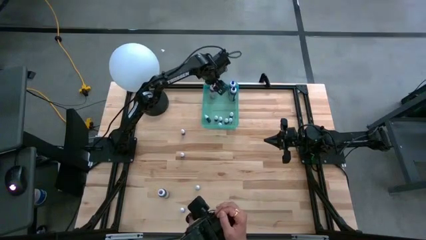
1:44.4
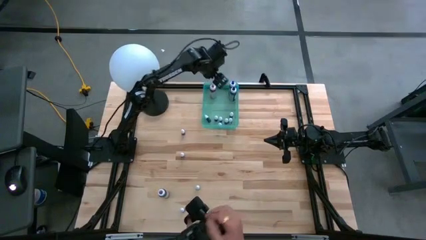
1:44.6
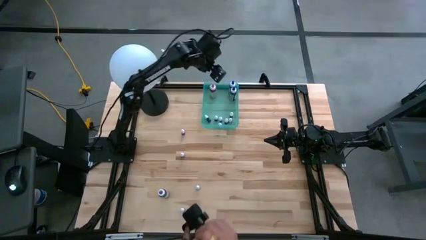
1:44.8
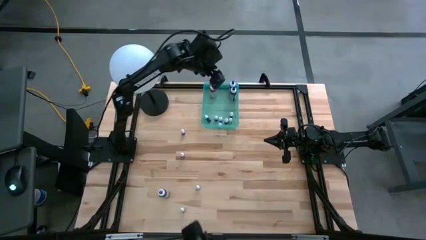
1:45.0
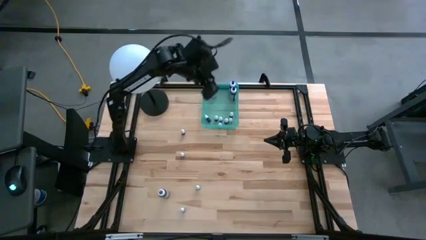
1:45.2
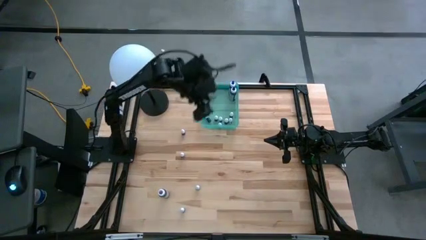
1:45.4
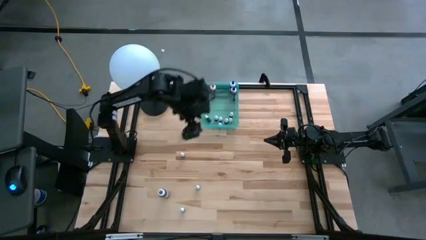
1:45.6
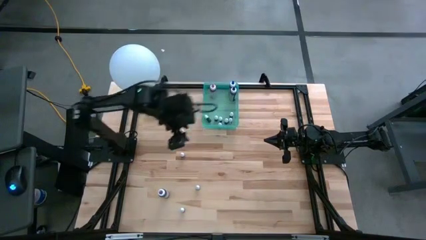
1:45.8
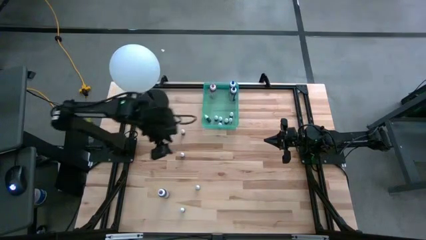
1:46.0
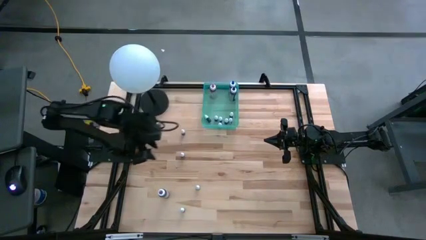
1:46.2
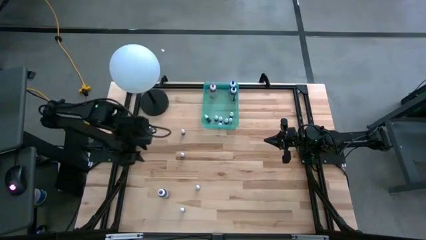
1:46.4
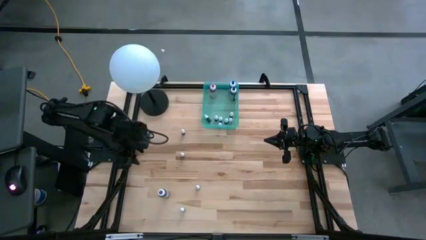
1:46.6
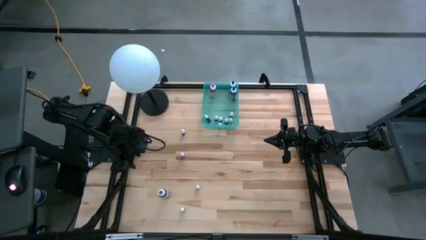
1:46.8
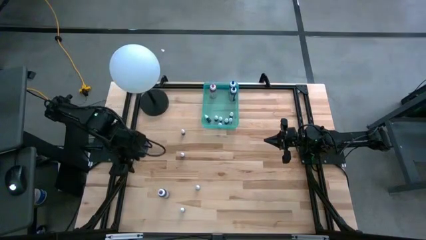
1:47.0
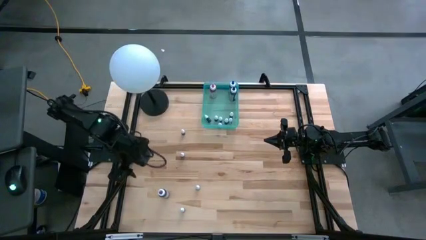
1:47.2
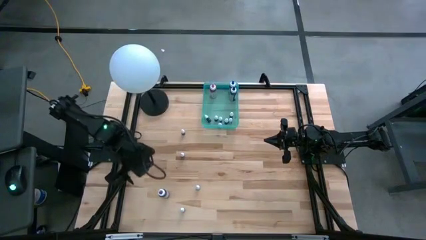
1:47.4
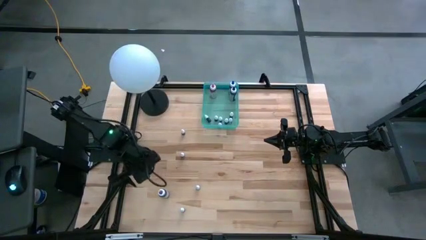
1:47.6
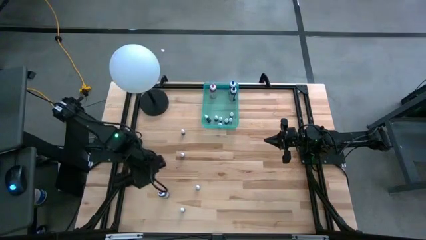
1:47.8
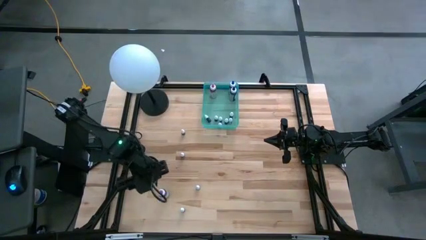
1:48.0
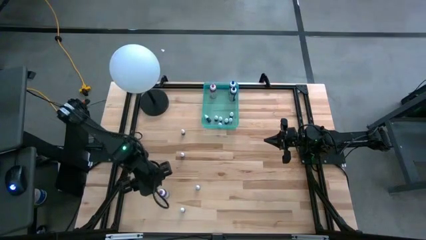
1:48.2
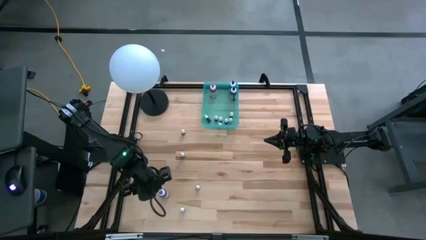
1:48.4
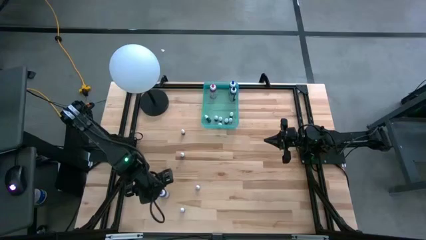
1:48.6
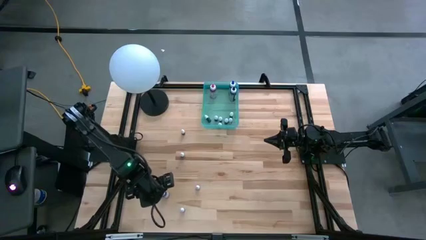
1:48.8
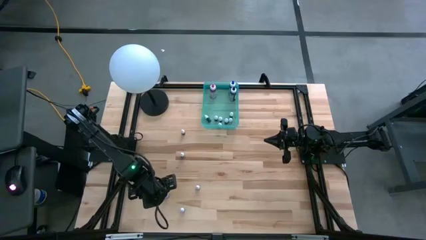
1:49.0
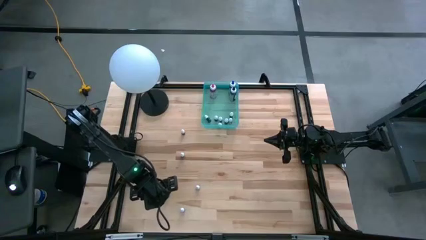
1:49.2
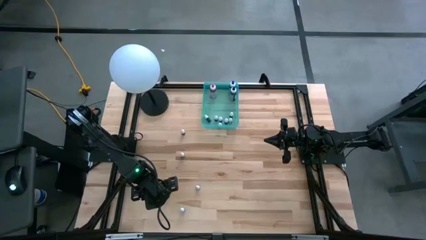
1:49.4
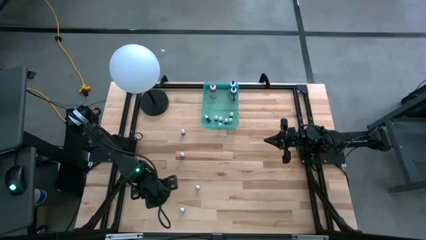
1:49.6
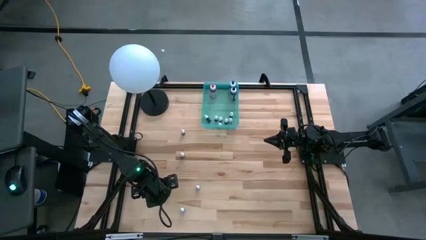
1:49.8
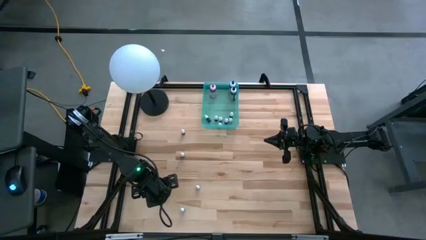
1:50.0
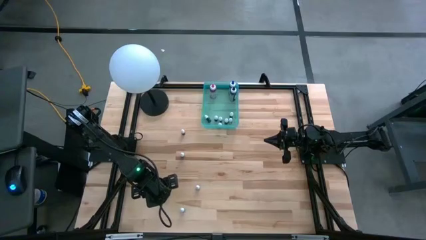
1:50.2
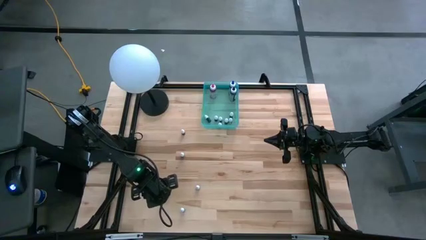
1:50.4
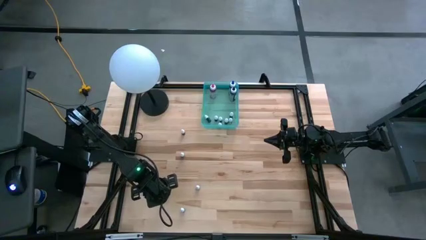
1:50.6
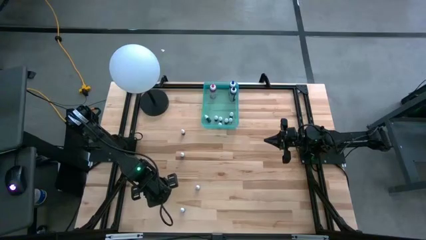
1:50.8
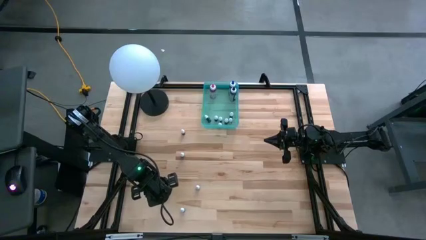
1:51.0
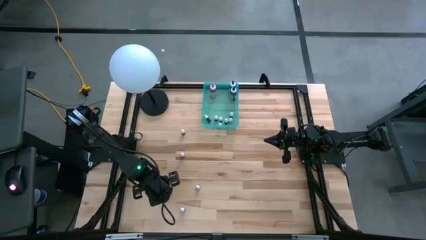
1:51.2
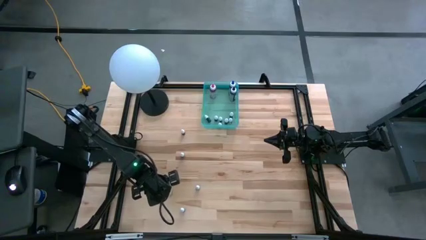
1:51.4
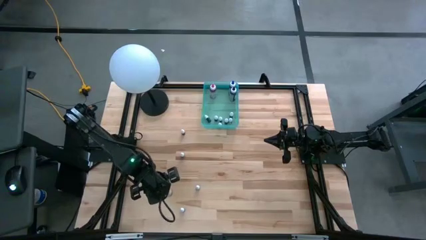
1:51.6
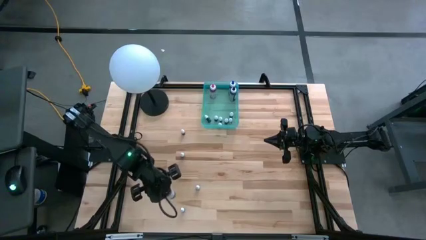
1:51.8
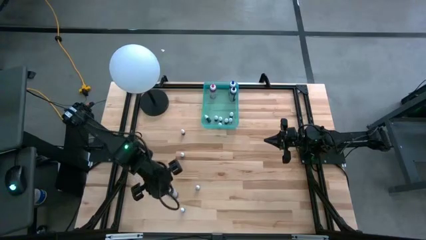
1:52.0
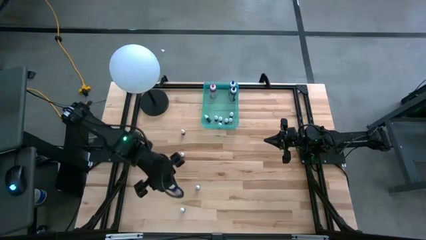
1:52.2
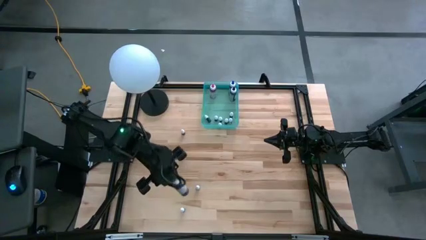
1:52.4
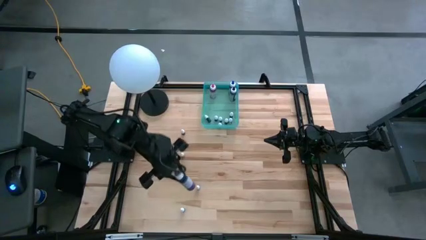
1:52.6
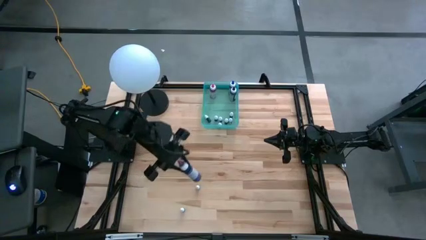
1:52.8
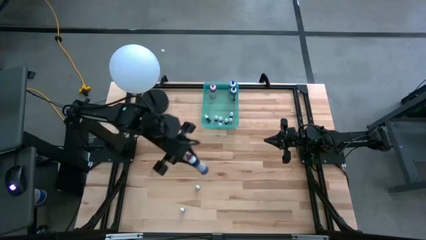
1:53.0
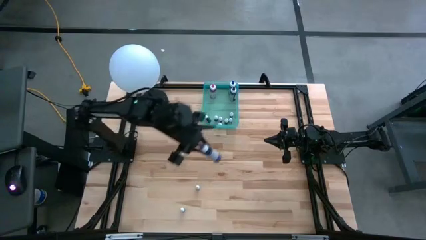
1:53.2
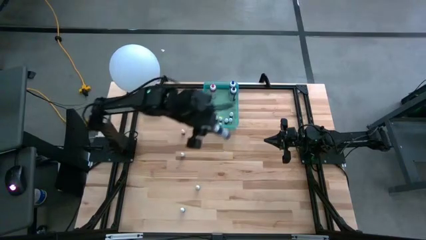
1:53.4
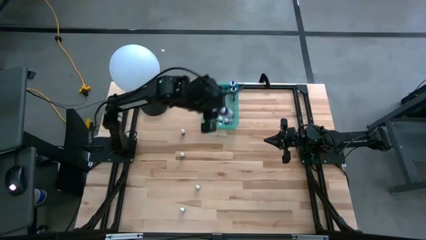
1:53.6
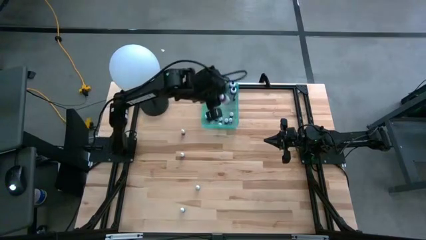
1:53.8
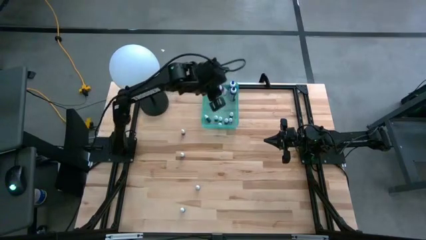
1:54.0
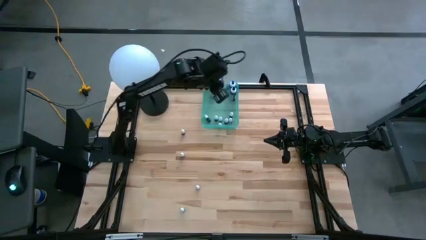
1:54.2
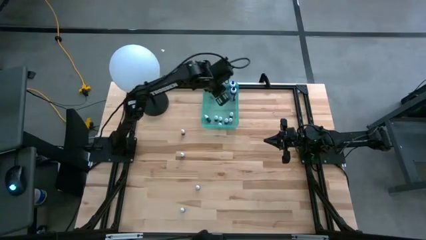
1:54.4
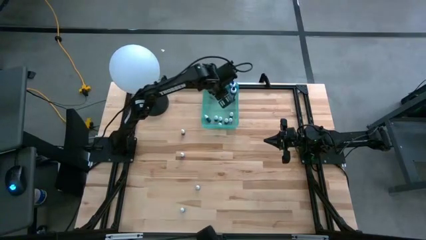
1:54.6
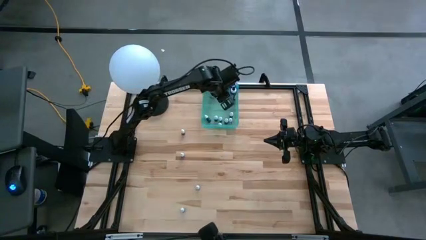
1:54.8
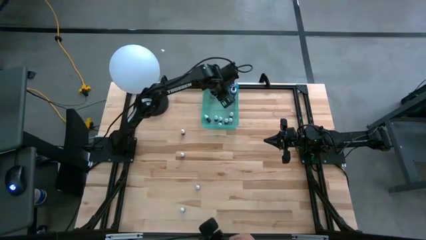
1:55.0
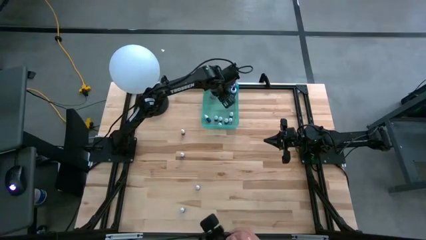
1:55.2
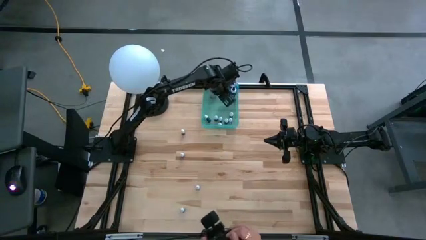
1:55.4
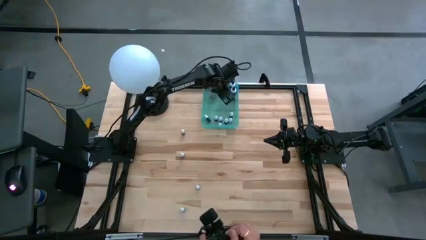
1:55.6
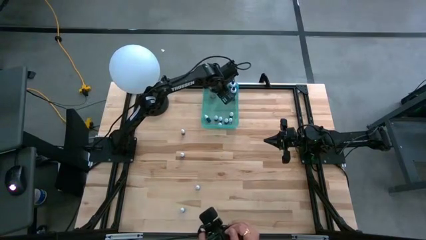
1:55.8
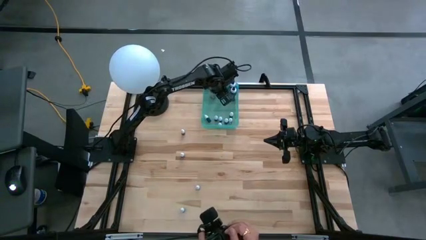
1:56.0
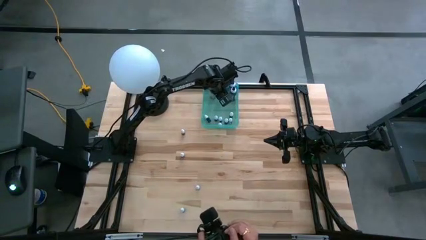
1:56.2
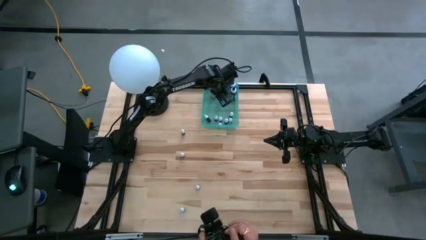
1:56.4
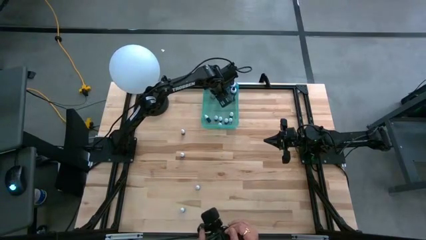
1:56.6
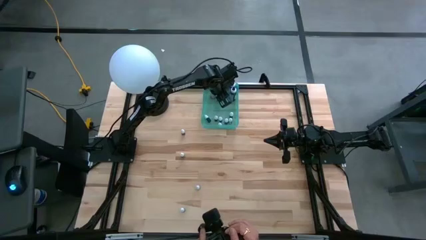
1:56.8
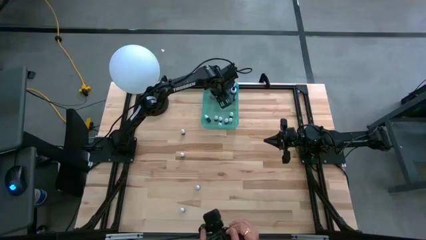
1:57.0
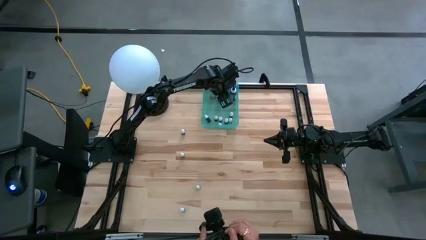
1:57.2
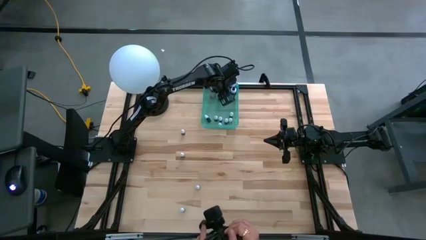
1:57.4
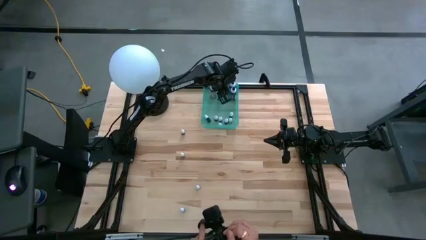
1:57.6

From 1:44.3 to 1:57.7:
Task: Pick & Place food coloring
Put the large violet food coloring bottle into the light blue bin

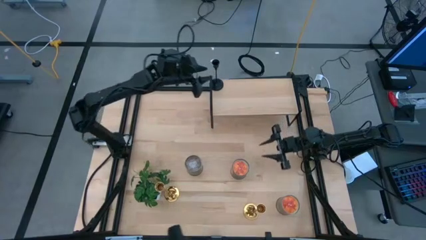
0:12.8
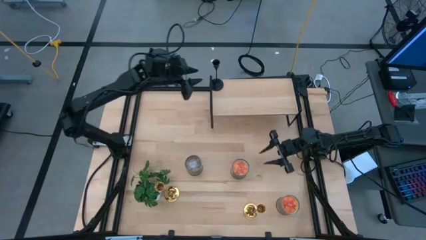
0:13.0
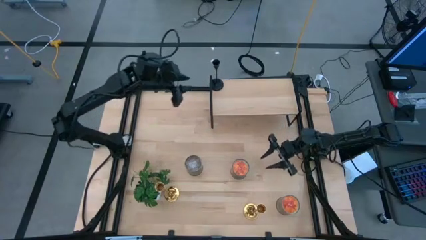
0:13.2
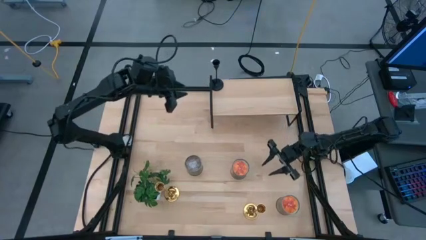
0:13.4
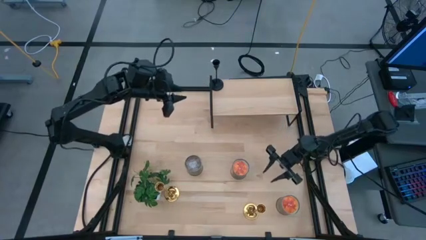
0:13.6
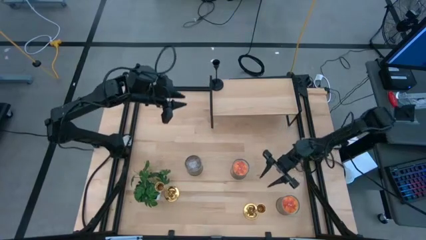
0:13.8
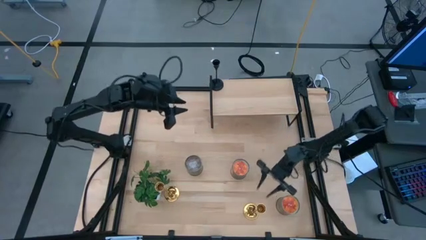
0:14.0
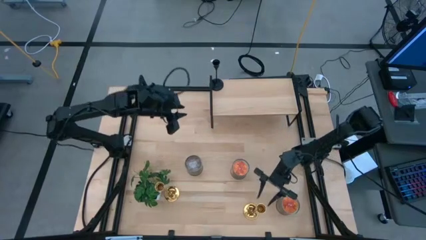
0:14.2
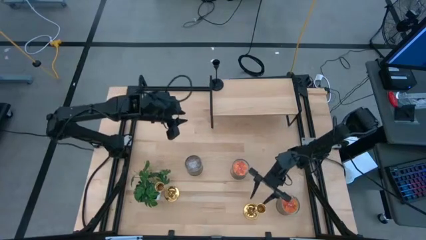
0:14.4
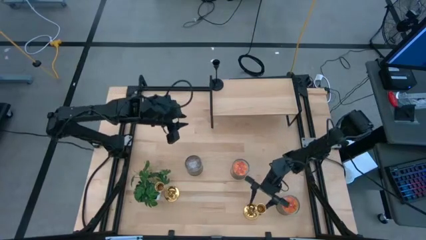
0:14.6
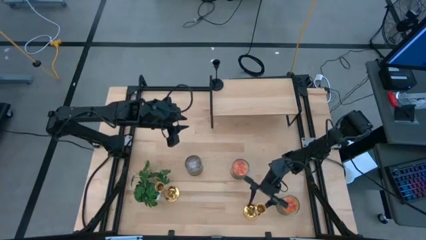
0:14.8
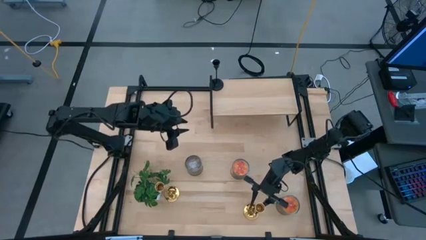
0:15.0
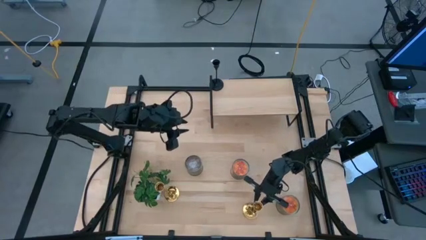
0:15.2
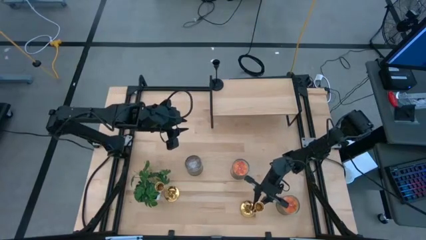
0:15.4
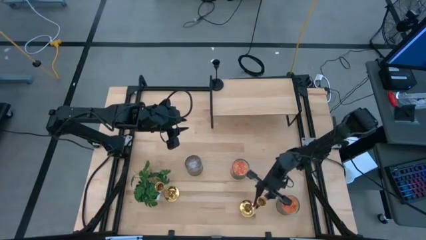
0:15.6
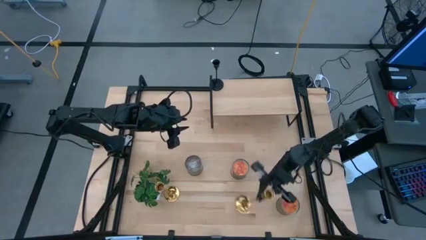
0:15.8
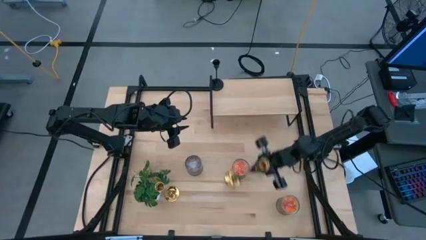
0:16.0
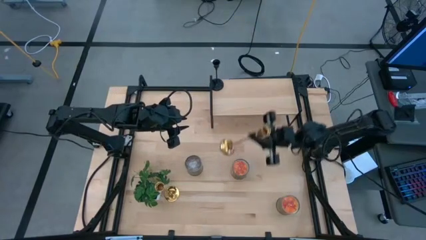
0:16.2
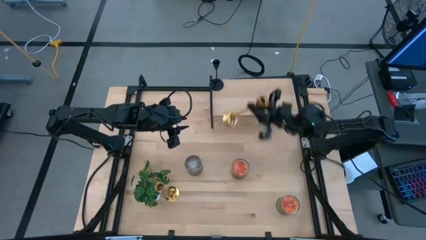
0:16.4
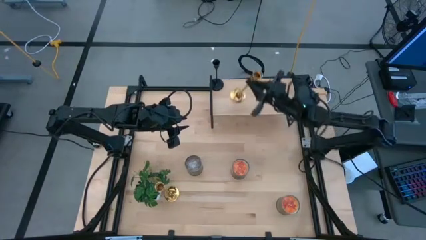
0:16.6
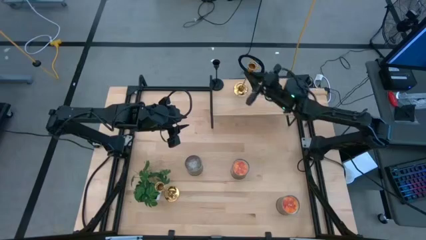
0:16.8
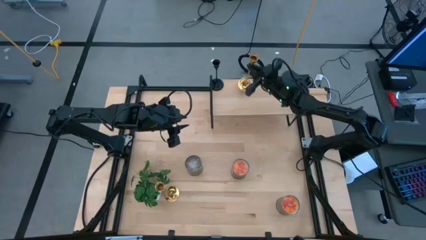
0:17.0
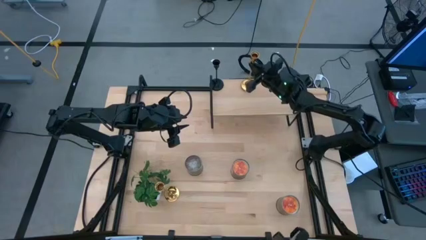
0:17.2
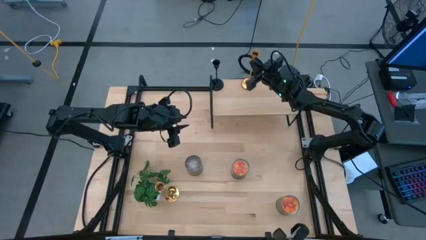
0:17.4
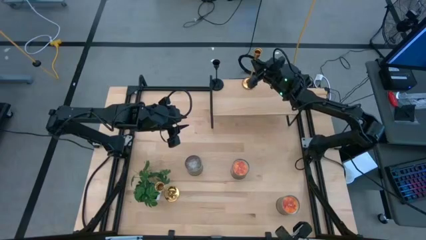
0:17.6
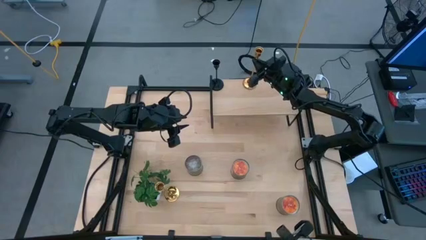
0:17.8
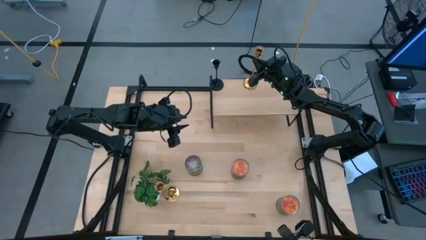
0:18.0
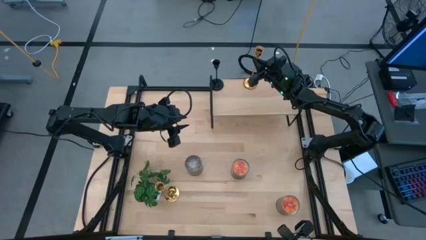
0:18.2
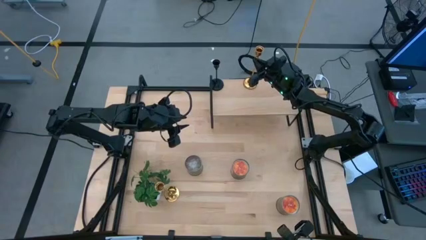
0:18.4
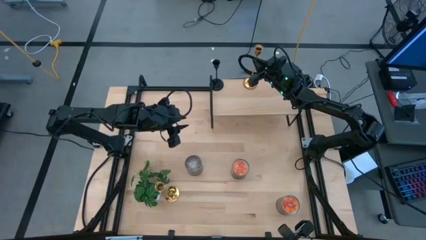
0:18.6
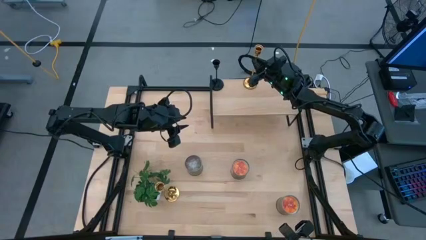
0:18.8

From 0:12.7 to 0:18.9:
Task: Pick & Place candle stick holders
Put the right gold candle holder on the shelf
